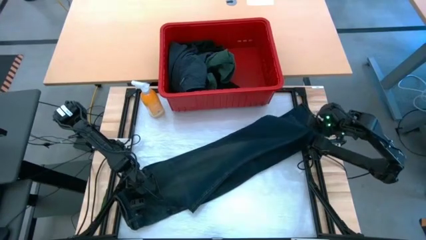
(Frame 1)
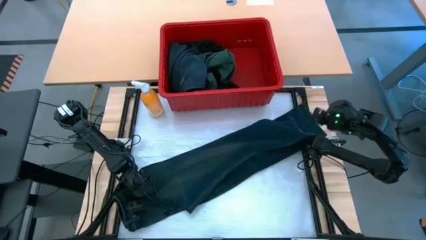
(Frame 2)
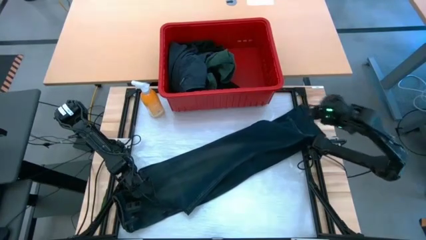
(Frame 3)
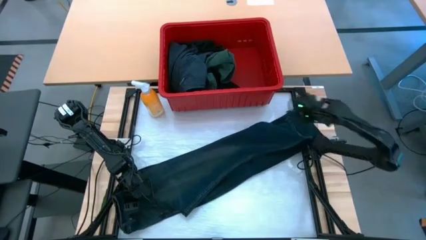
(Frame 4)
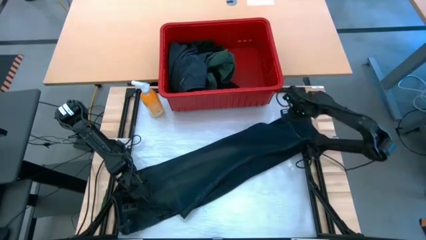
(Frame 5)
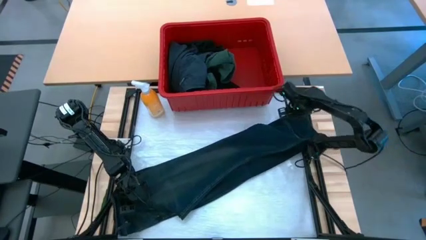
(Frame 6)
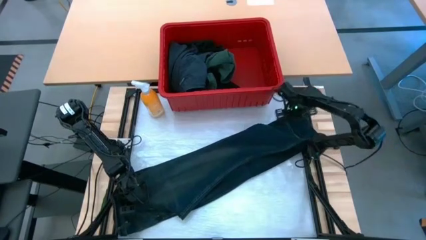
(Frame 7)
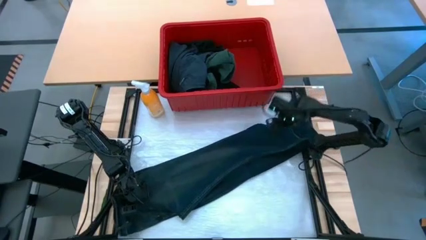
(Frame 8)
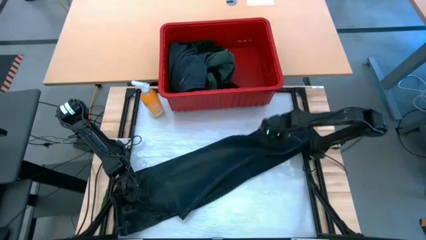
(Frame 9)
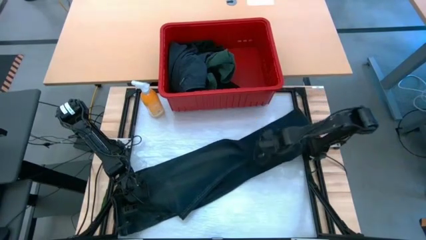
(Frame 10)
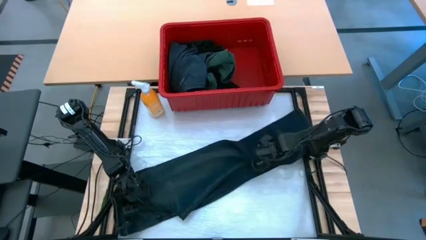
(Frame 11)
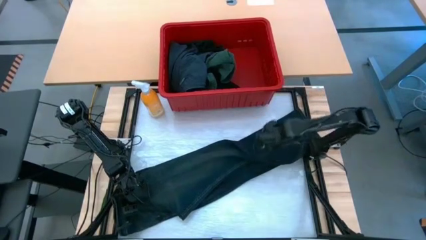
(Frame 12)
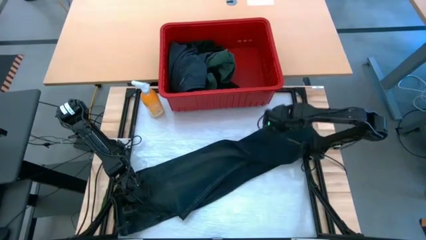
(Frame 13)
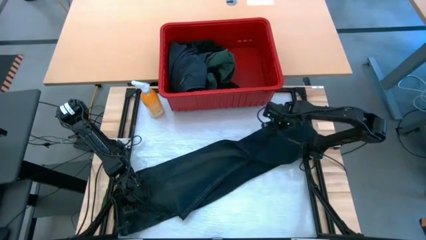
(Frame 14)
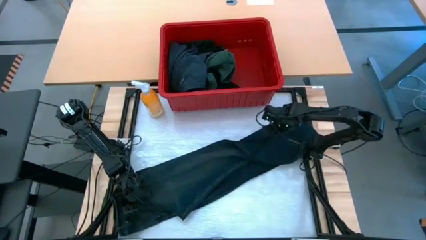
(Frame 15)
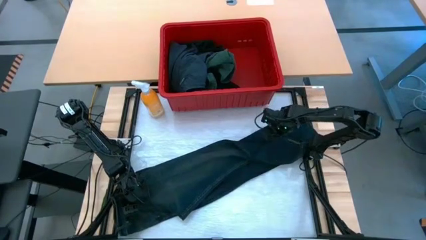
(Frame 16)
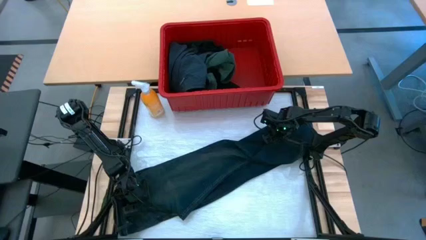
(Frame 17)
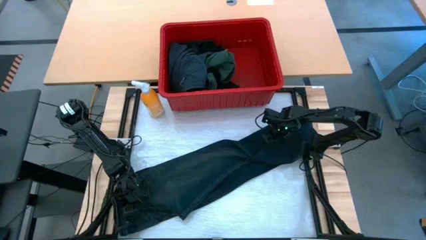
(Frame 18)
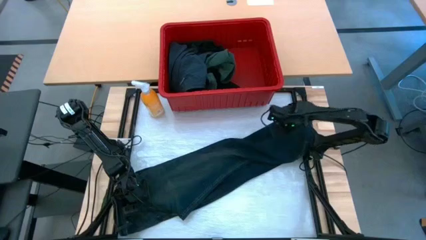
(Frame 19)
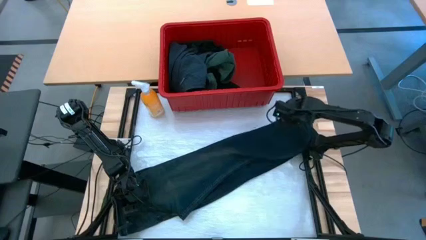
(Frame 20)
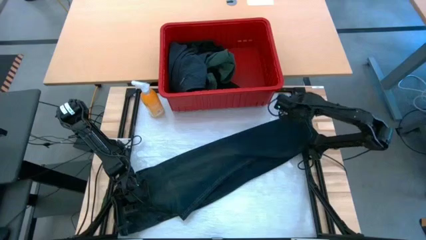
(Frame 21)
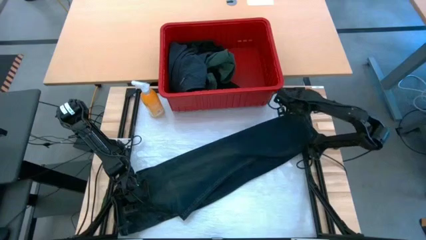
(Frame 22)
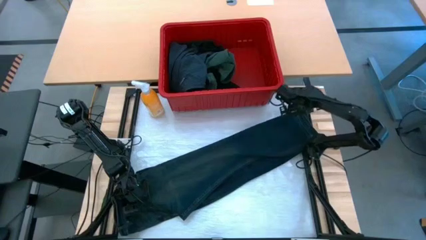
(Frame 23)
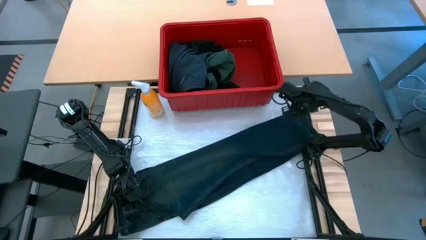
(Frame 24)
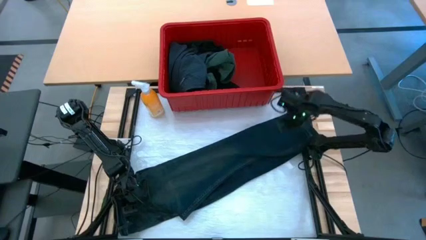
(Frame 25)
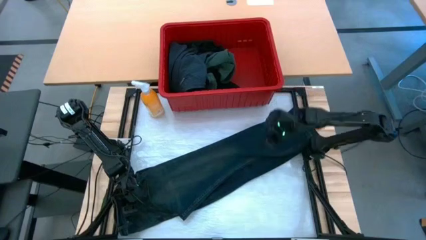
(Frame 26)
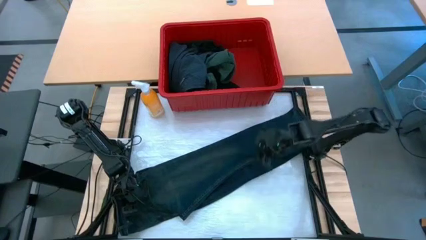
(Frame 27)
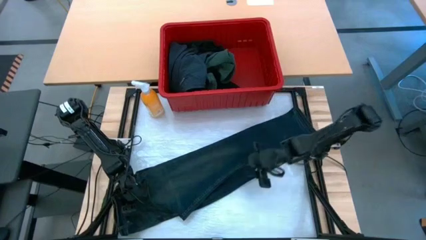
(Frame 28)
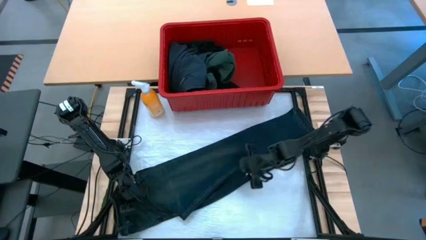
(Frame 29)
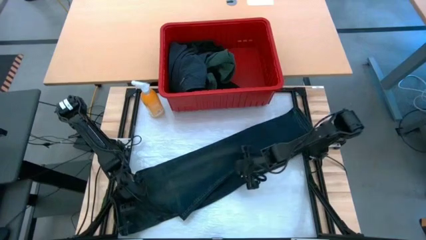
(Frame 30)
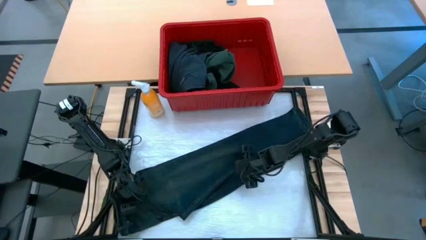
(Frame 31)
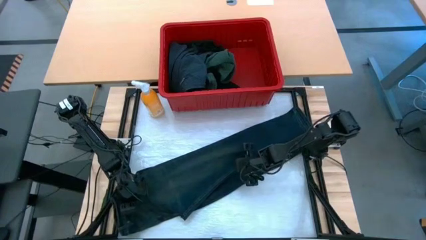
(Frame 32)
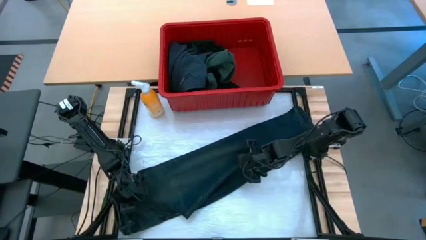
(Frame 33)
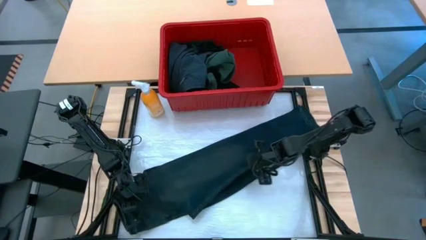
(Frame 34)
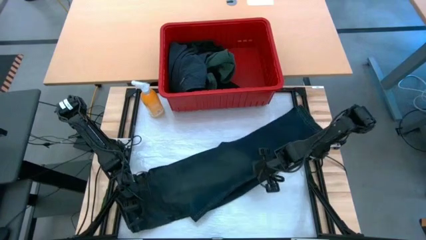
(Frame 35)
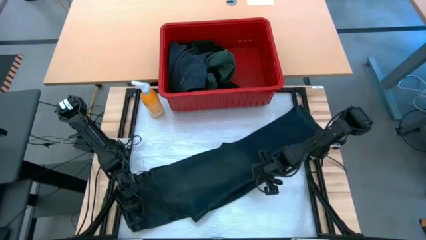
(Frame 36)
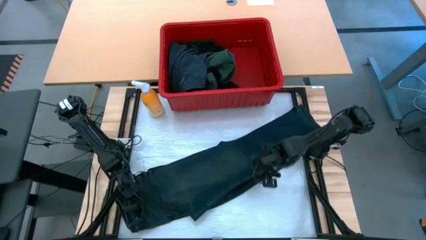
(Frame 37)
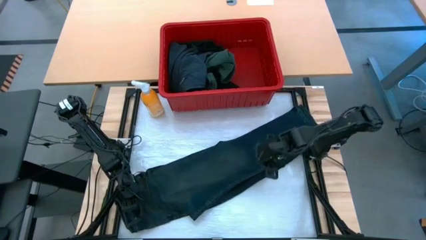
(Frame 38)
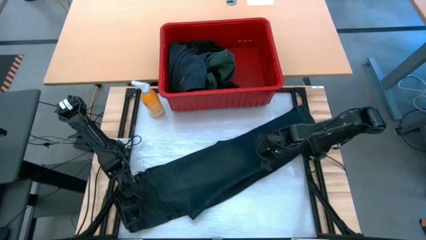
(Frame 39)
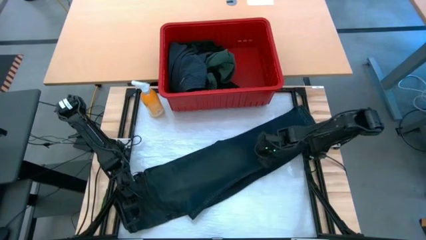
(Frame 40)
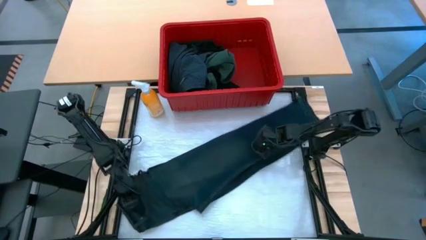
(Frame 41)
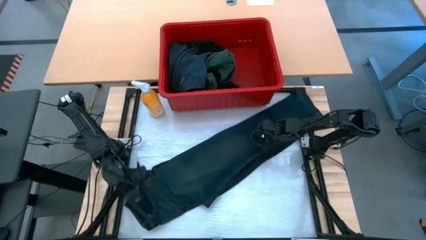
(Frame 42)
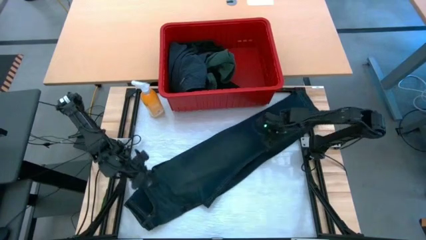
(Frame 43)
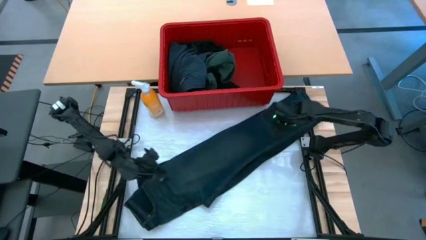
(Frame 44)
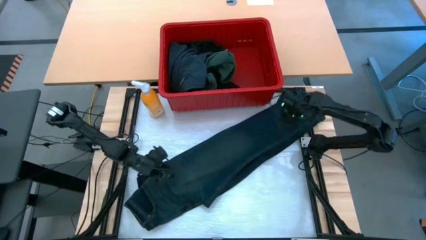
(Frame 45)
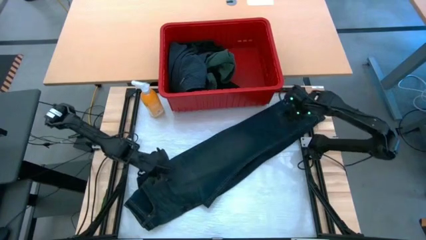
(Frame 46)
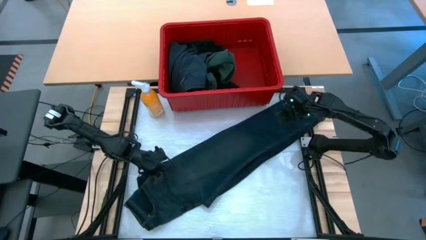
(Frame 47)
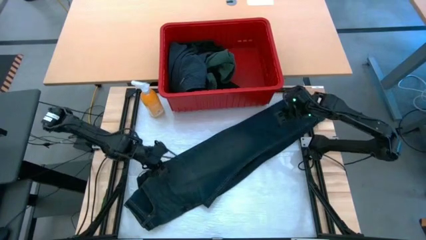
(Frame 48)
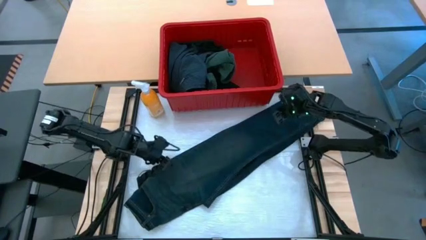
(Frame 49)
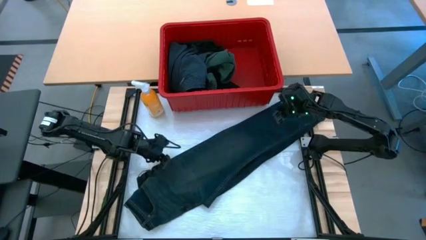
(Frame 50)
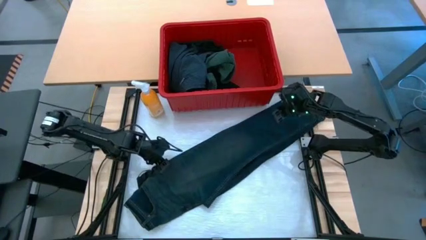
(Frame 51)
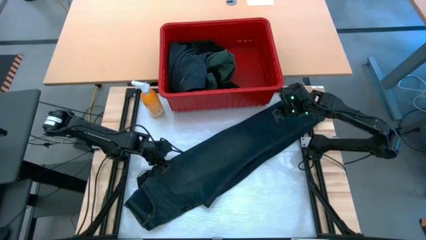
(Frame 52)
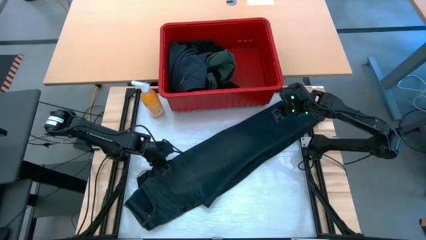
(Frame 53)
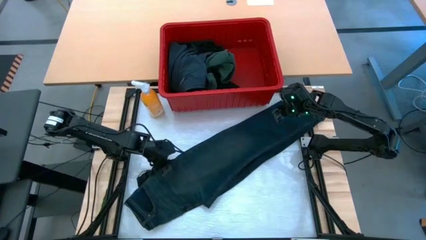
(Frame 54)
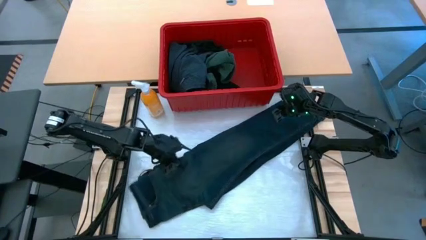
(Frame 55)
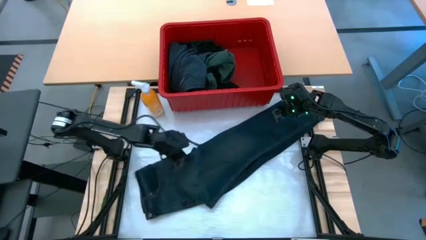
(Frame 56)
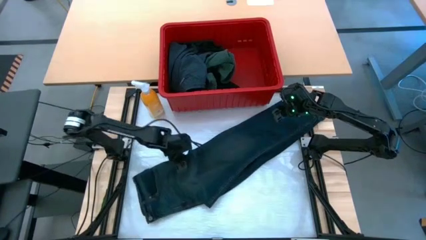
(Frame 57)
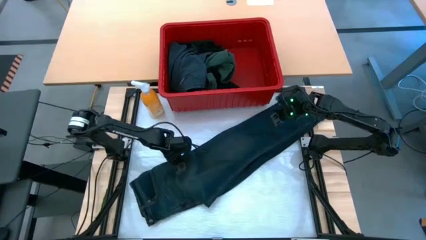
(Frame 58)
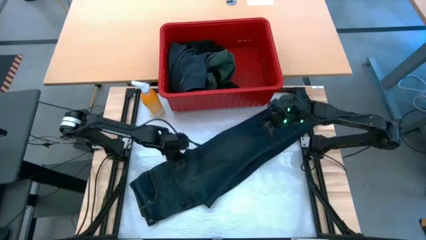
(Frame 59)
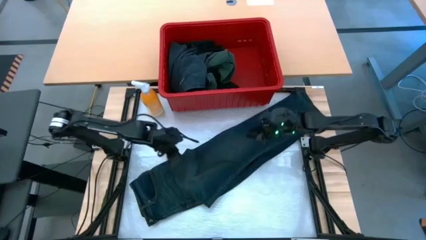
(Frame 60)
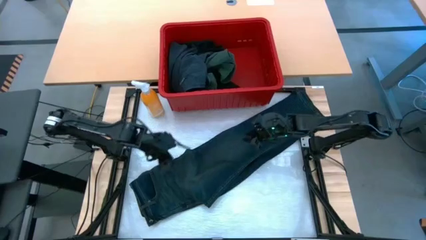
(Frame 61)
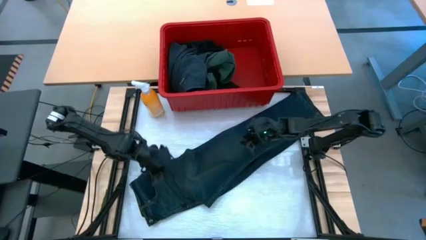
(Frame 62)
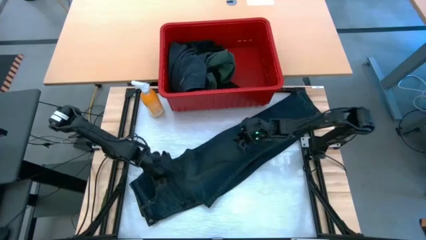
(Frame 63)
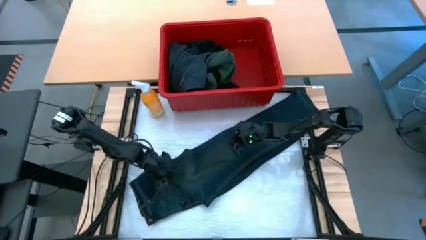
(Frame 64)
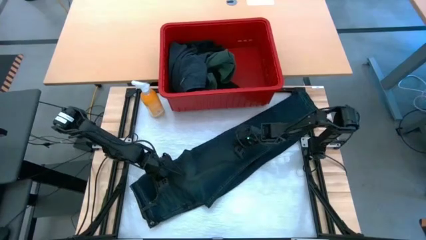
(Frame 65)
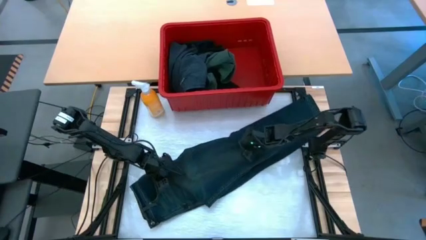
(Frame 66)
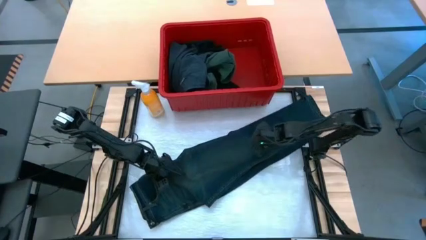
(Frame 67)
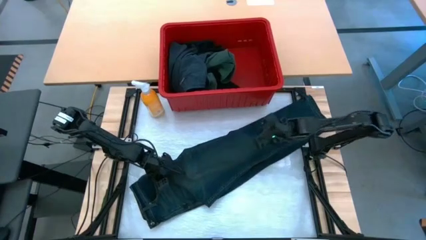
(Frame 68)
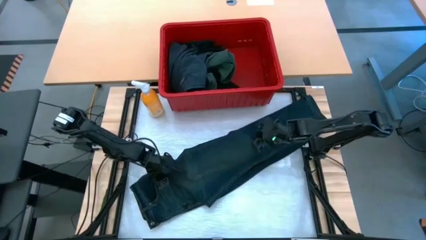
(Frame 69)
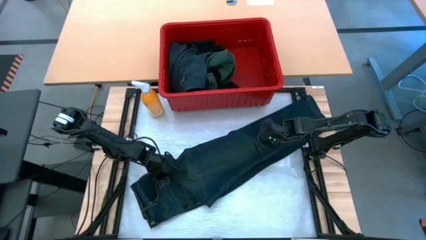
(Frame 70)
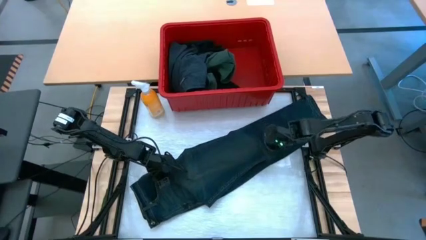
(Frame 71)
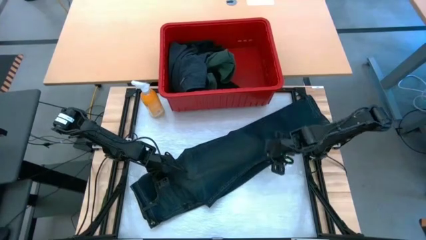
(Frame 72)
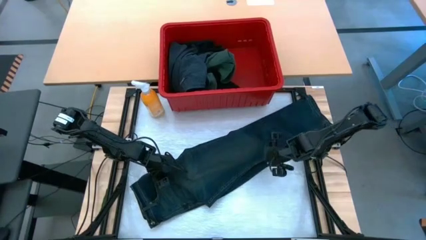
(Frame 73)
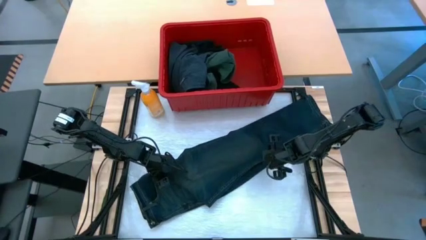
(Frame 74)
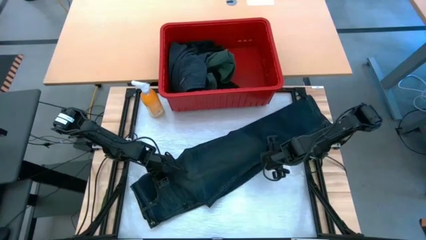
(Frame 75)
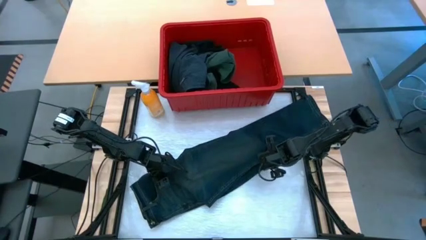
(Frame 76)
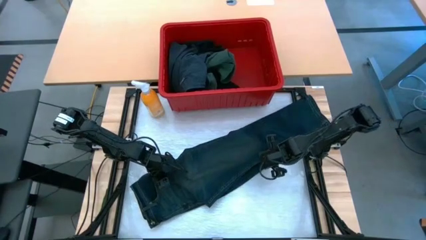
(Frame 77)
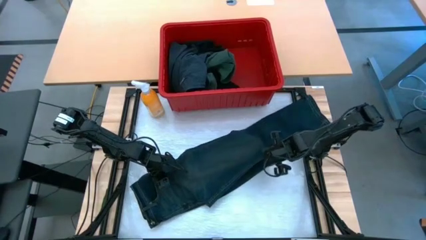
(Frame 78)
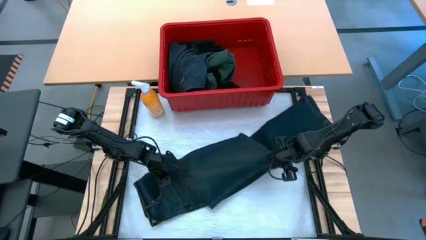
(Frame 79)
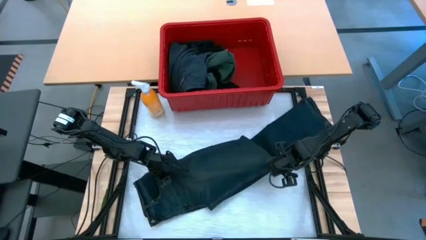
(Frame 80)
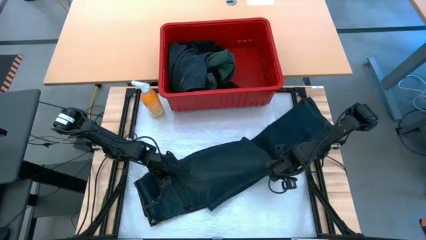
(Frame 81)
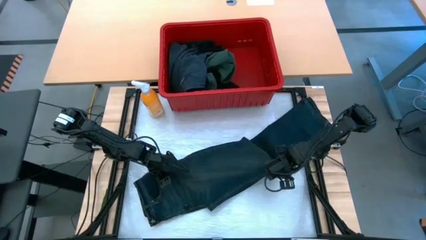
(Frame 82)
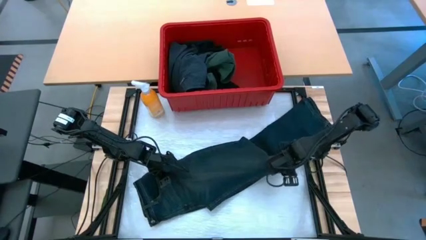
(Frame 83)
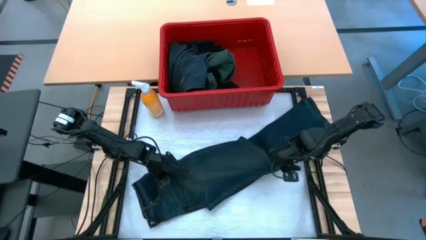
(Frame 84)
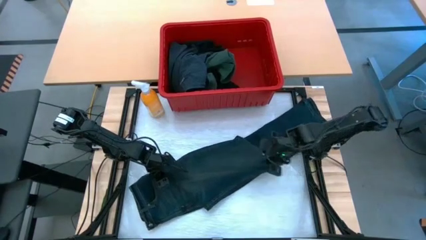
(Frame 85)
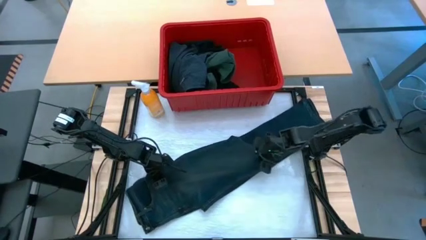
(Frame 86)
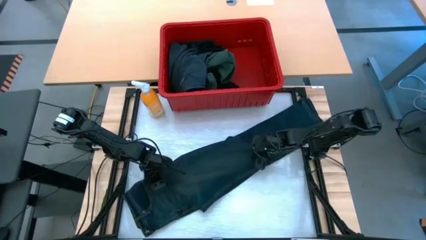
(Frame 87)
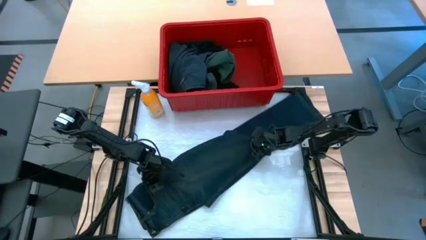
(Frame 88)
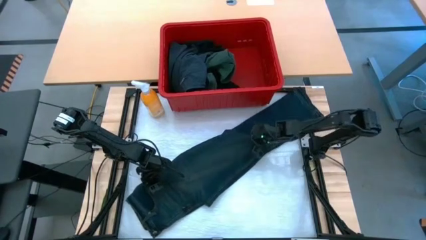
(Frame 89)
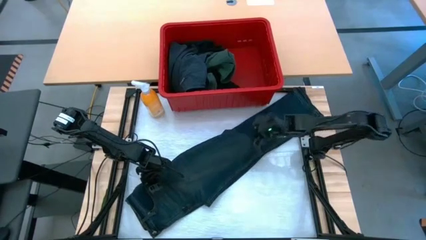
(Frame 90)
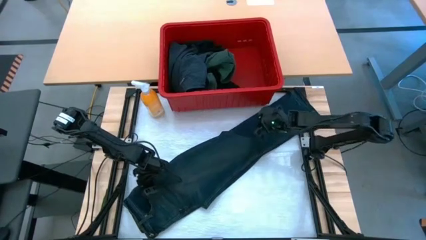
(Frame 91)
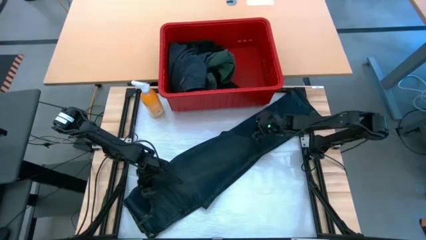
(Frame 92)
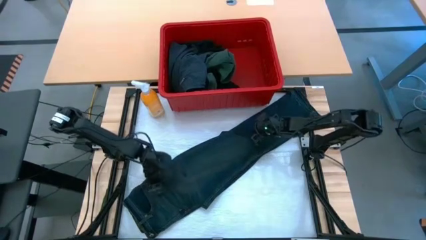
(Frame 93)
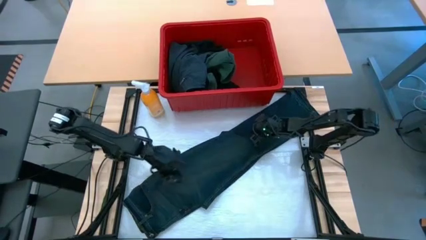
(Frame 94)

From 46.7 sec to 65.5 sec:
Task: Fold Laundry from Bin
Fold the blue pants
